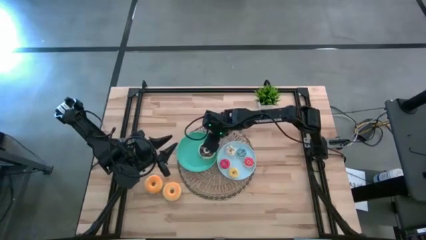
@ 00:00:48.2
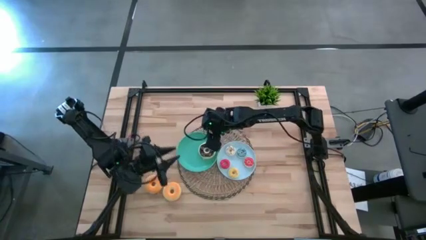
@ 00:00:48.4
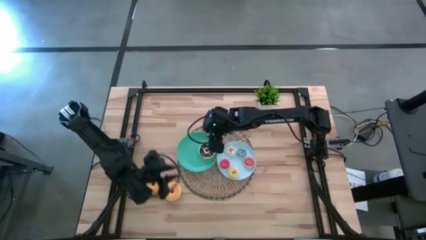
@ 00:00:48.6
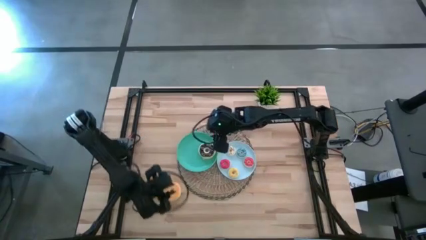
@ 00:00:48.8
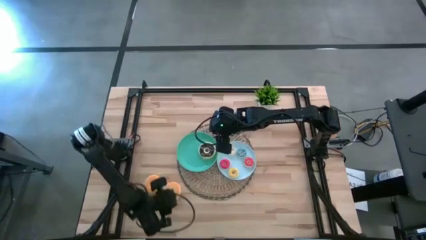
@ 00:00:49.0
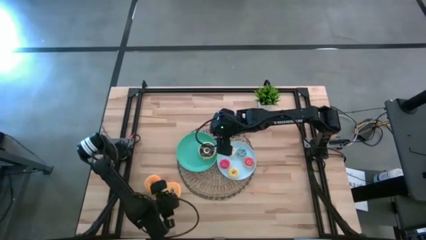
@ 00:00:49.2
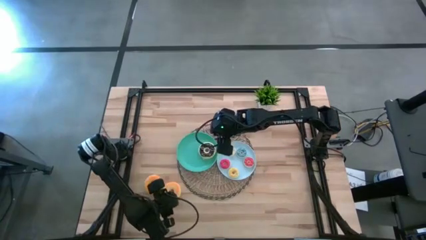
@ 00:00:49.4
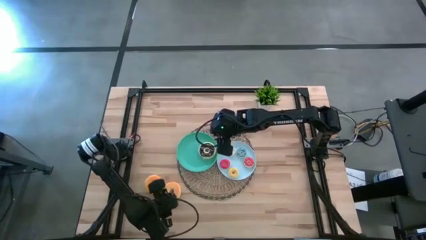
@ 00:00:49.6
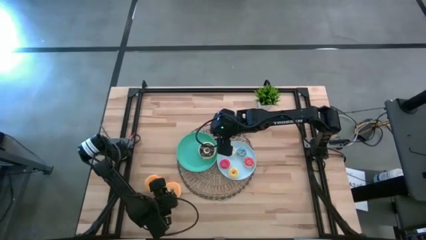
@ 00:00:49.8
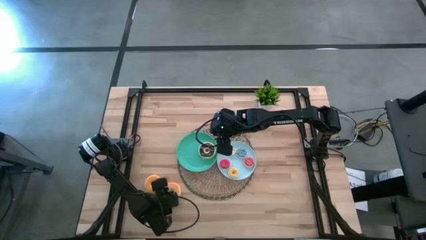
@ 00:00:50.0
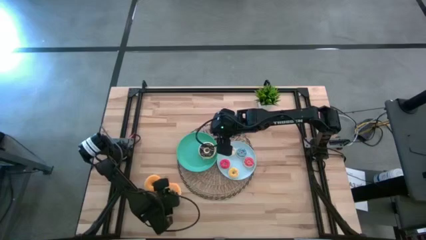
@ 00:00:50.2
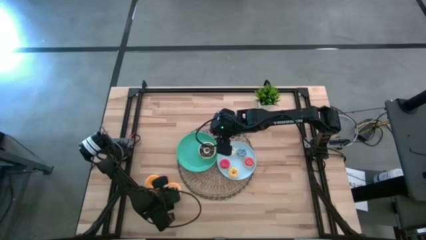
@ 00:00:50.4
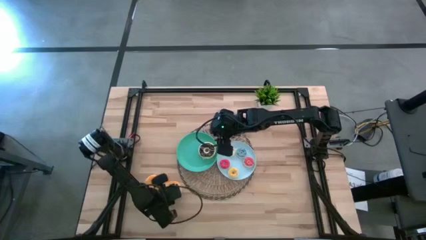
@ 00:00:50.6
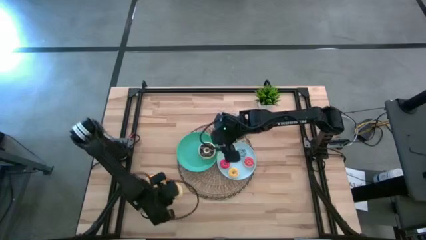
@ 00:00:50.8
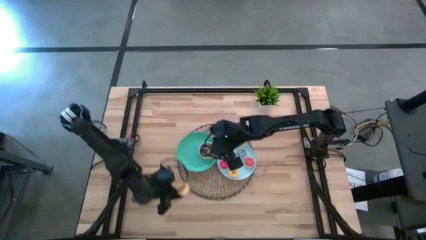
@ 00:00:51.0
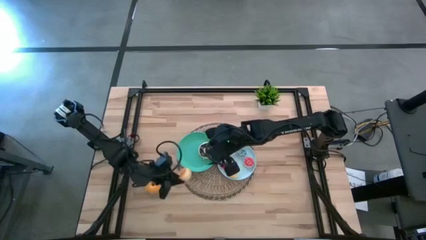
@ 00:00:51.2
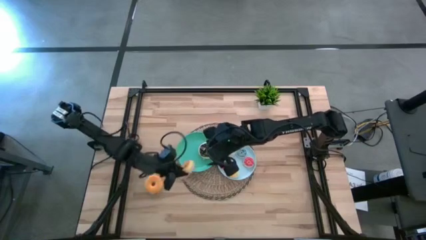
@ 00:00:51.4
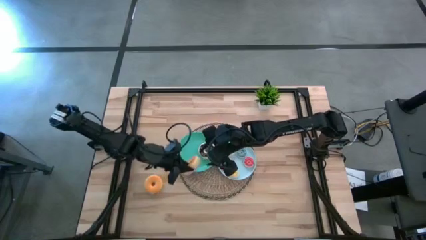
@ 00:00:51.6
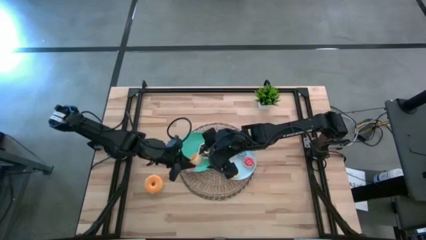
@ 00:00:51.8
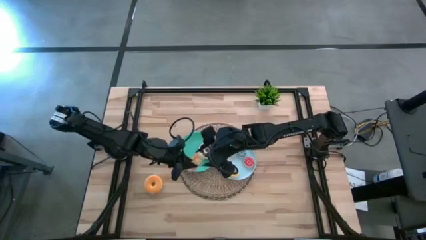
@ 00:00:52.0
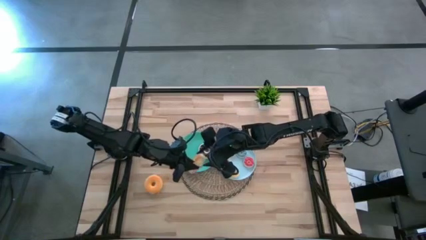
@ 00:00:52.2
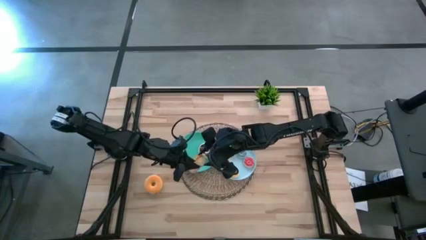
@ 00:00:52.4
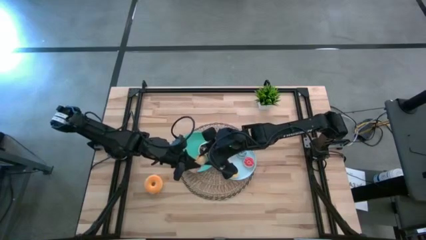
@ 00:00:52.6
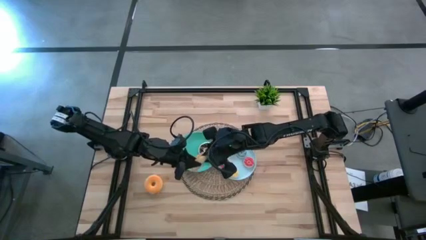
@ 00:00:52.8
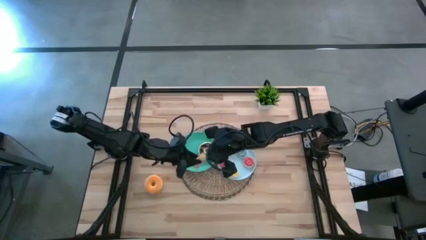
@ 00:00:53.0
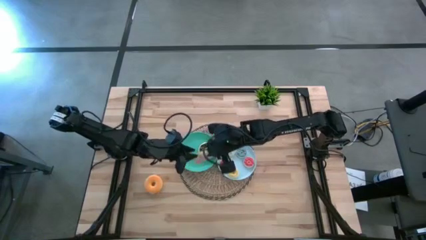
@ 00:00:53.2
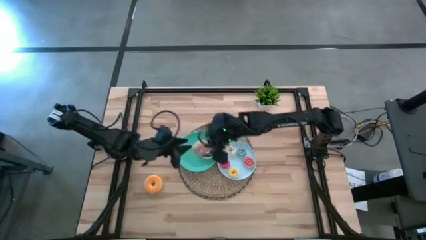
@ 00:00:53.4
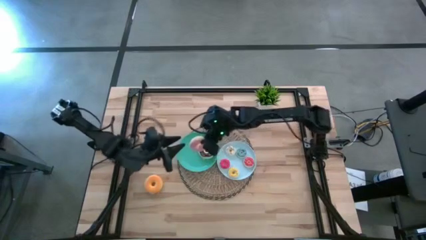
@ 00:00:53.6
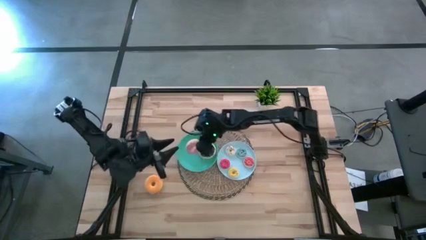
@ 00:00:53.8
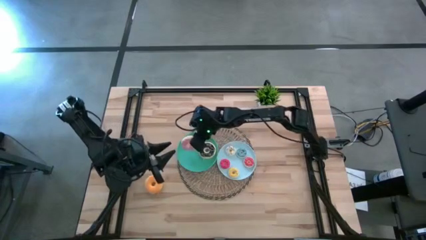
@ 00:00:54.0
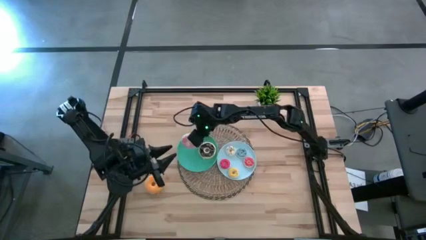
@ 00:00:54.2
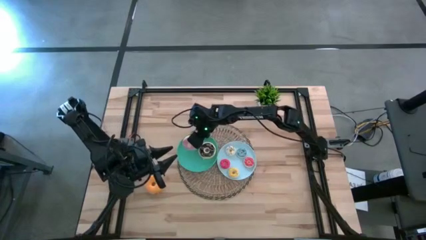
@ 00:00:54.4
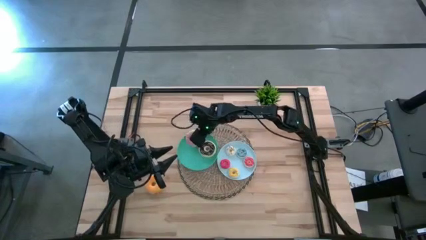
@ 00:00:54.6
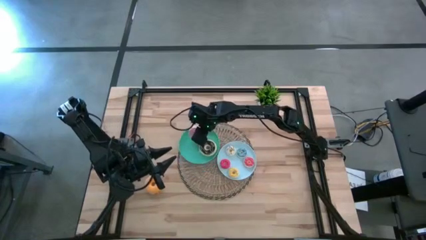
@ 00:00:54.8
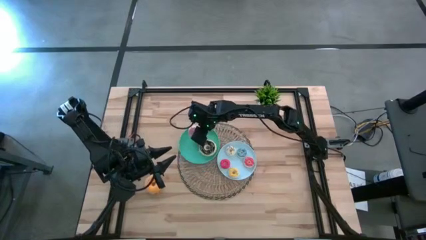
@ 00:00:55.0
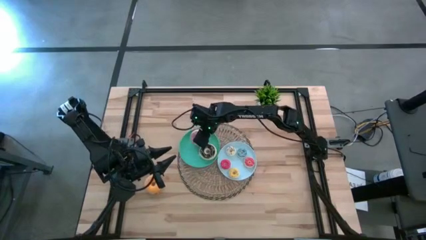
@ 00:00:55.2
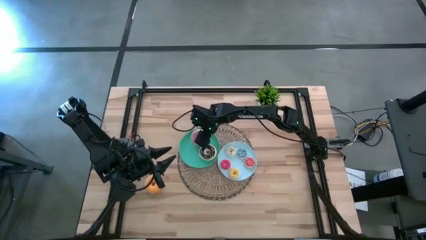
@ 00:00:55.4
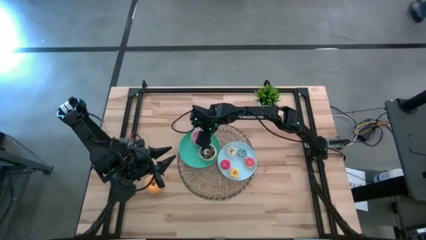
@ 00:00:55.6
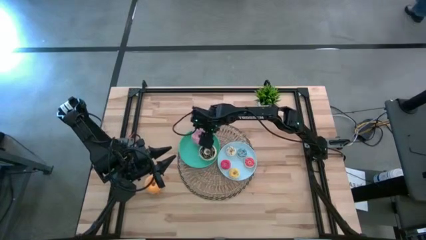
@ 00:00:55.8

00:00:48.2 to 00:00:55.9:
Task: Pick & Place donuts
Put the big pink donut on the green plate

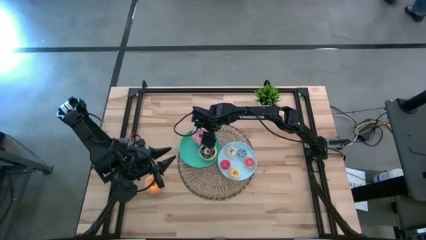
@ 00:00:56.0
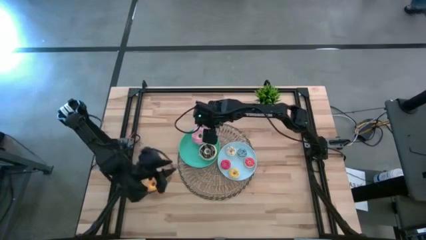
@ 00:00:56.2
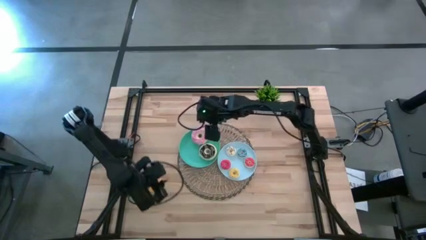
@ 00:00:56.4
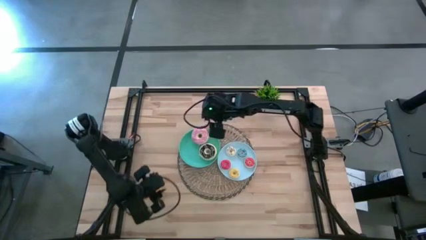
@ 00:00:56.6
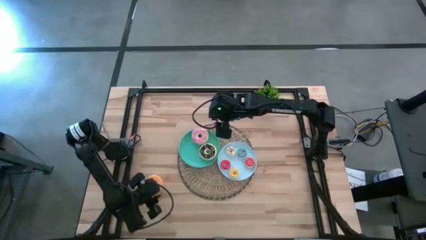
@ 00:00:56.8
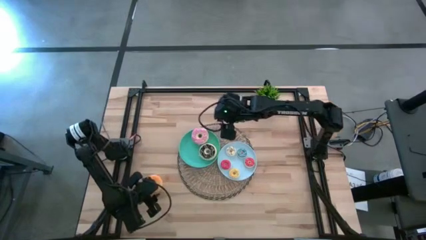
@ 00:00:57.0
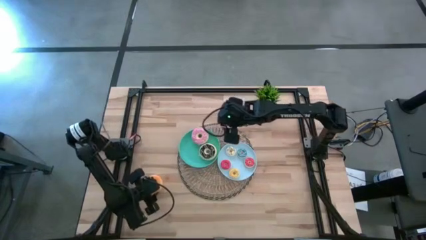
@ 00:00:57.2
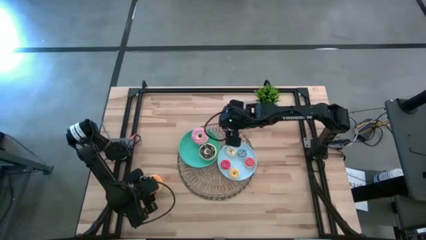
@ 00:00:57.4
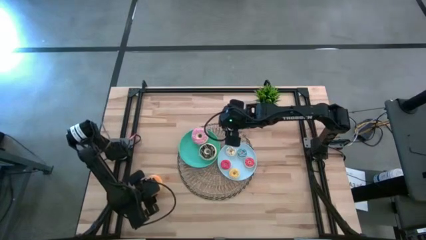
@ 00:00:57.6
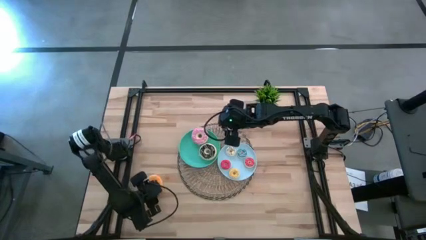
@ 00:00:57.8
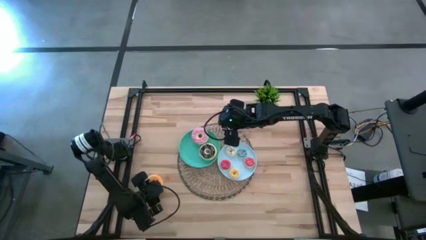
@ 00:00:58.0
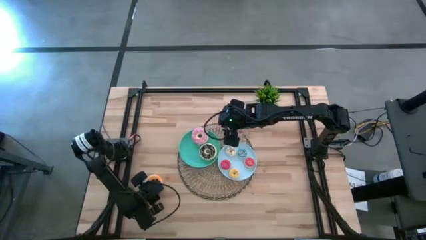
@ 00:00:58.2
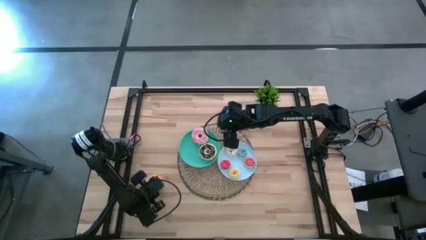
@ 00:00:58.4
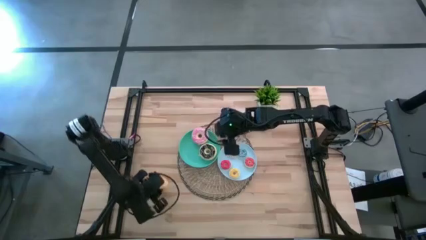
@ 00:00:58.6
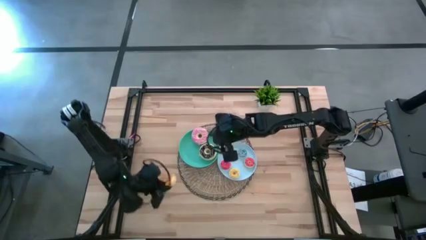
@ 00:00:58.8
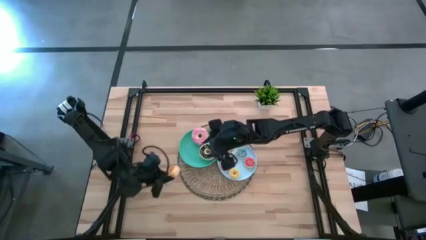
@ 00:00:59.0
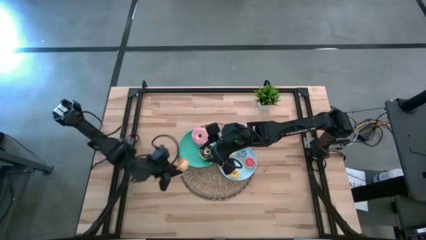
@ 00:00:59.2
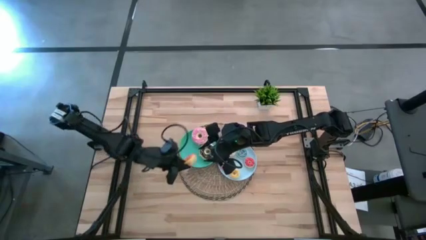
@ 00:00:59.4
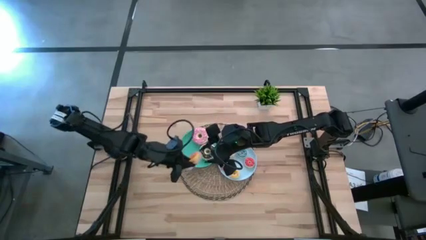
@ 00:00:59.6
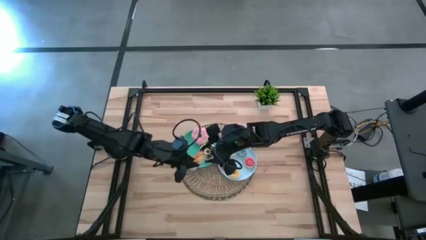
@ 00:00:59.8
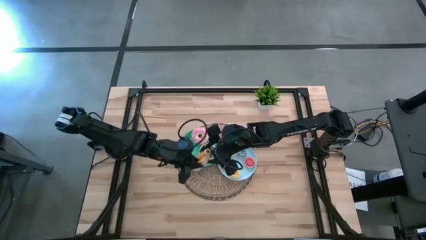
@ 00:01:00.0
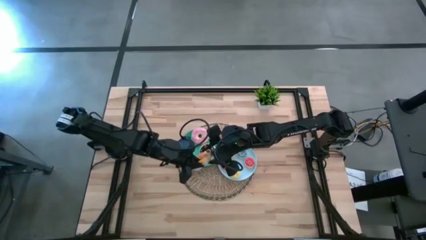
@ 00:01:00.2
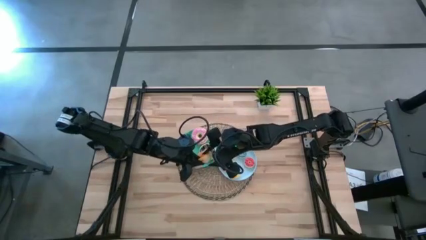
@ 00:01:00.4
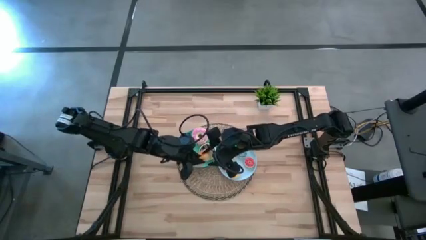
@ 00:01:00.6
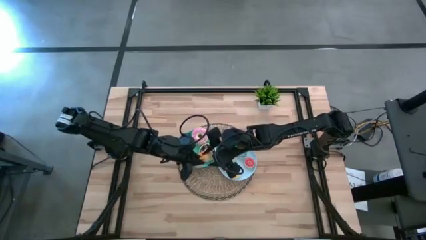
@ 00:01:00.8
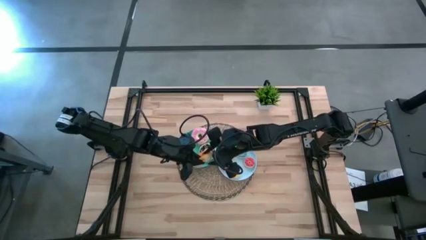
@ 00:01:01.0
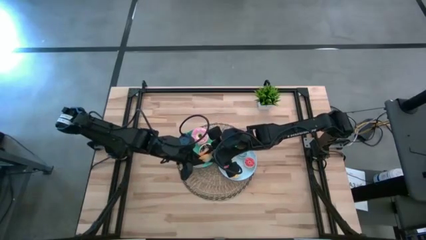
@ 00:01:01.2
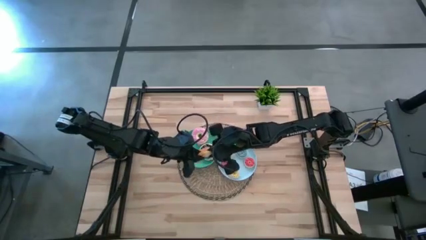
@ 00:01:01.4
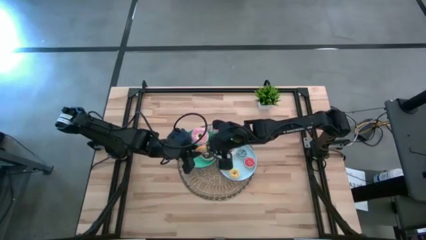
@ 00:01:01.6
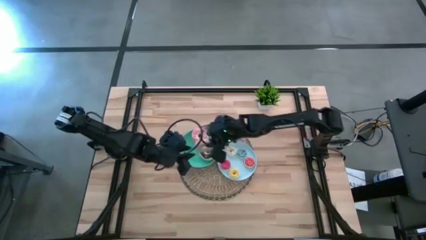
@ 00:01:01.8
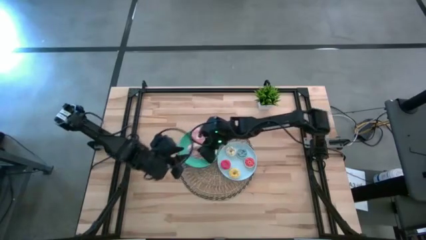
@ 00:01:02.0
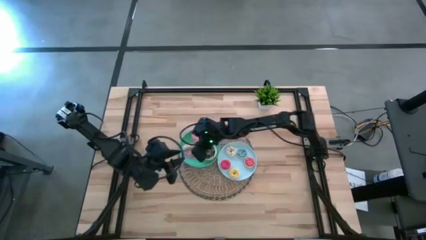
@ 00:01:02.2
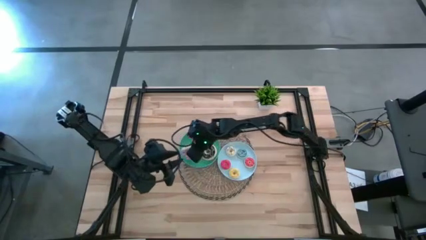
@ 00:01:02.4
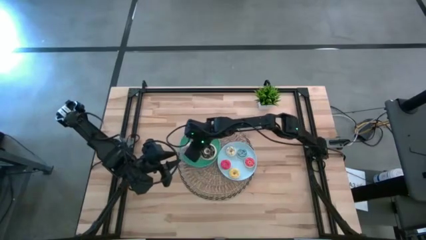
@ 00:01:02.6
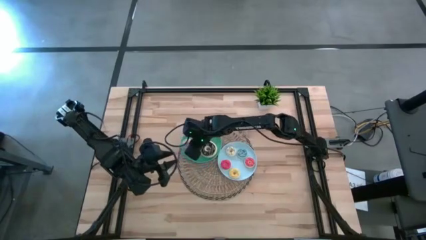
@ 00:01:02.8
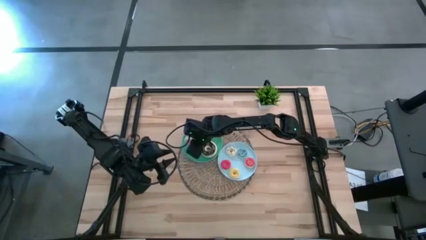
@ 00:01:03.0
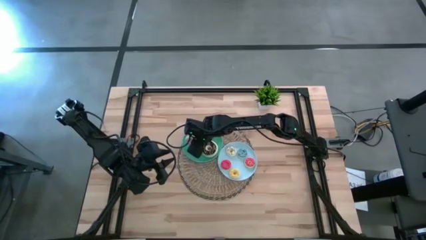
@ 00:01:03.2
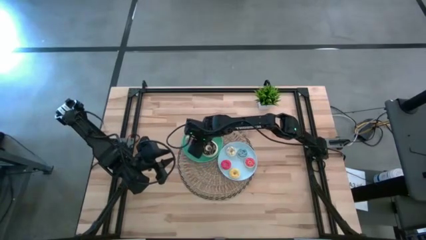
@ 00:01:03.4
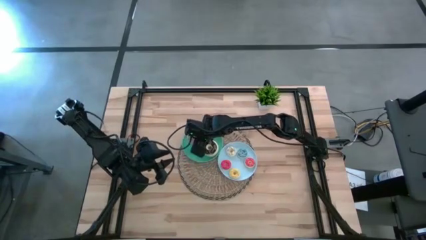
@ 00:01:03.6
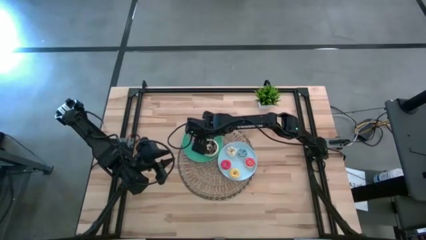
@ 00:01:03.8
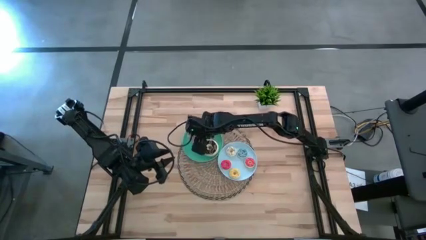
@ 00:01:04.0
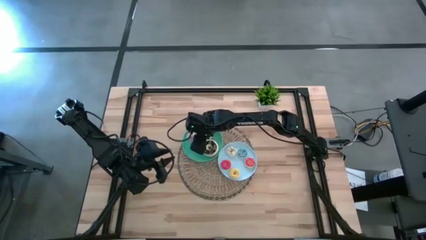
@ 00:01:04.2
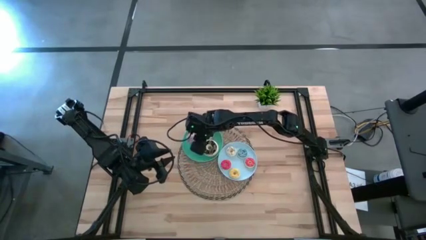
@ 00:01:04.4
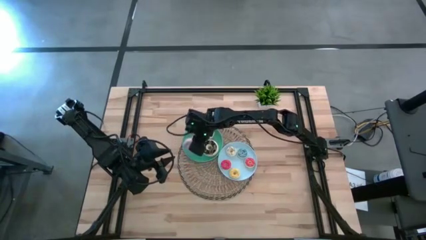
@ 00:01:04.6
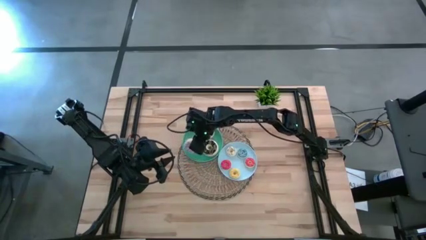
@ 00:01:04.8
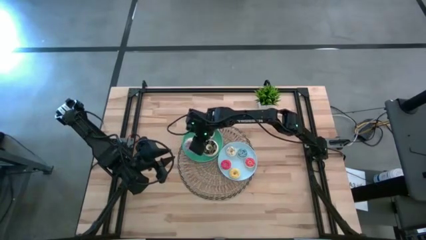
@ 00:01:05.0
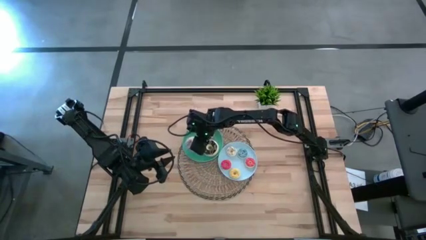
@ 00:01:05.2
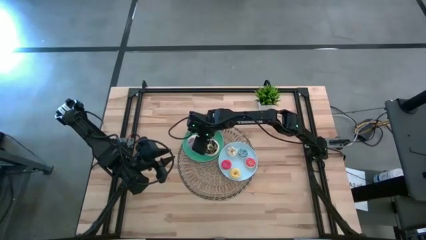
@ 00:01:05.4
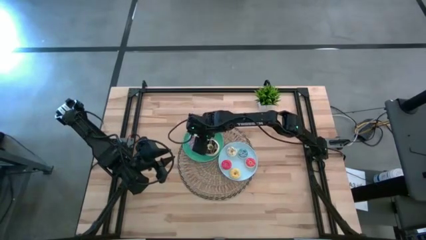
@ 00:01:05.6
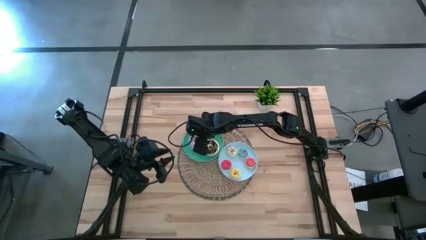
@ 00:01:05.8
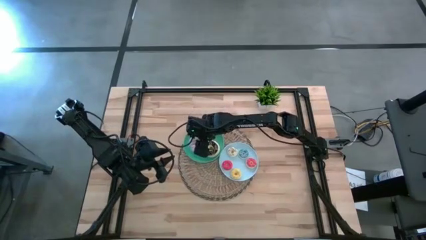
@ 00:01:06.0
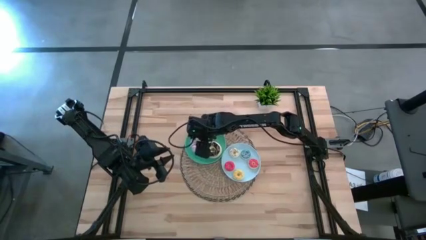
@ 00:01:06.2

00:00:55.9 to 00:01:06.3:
Put the big purple donut on the green plate
